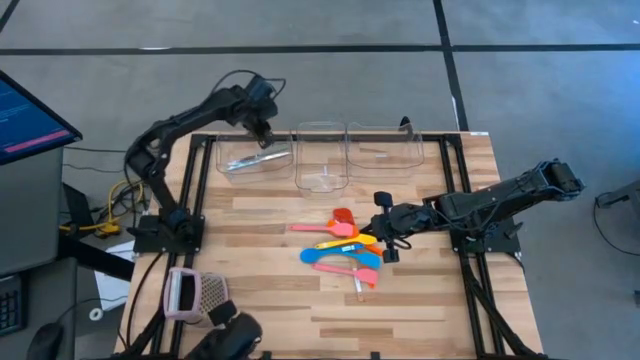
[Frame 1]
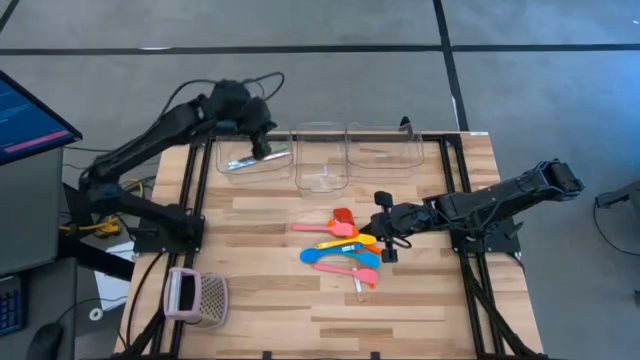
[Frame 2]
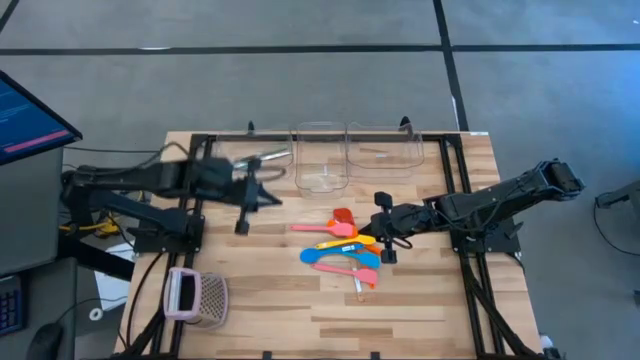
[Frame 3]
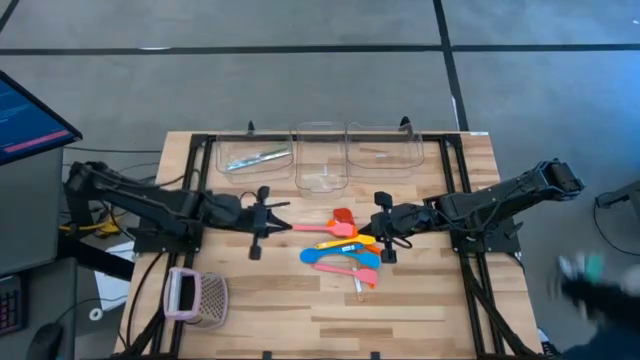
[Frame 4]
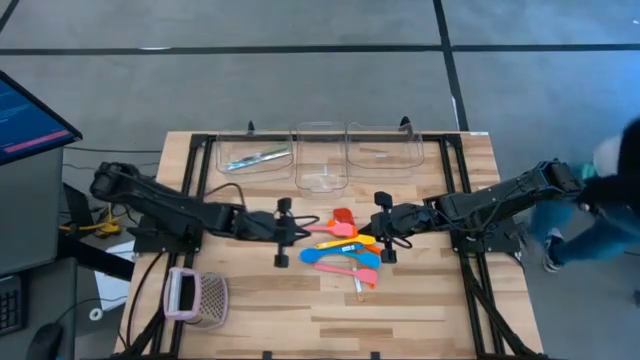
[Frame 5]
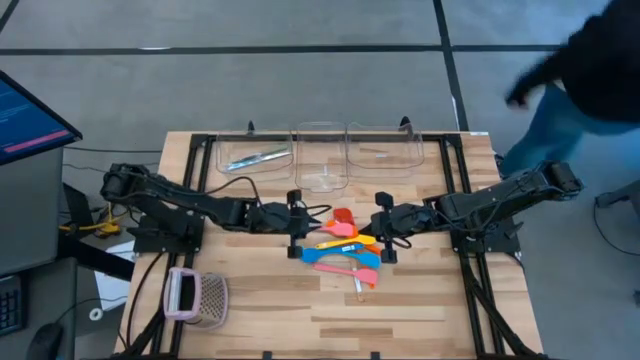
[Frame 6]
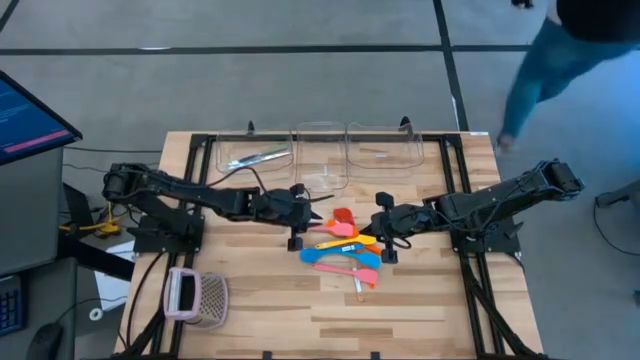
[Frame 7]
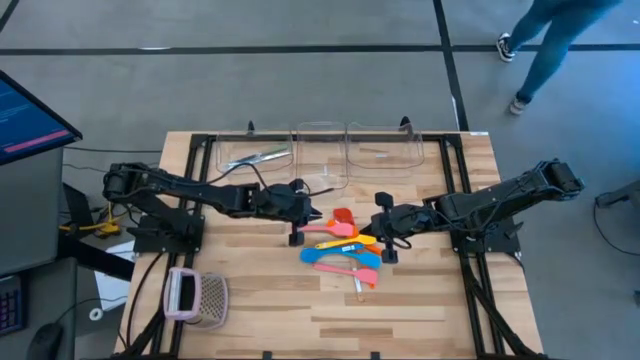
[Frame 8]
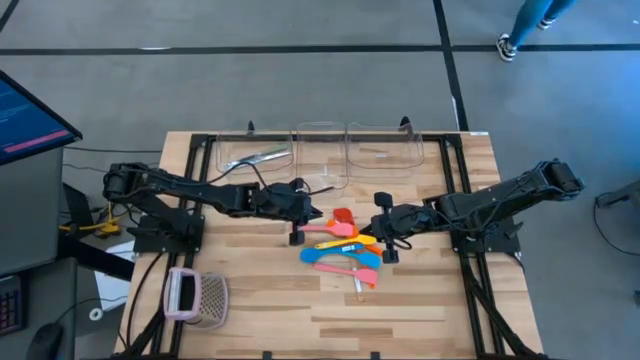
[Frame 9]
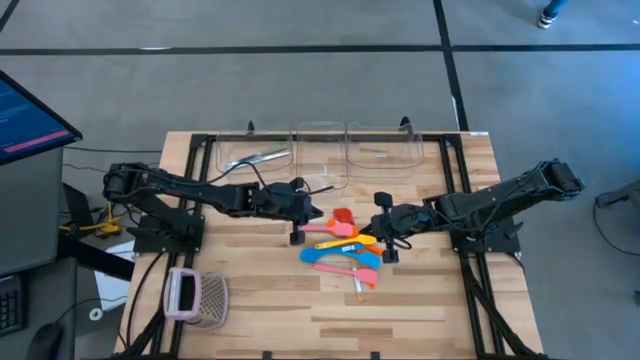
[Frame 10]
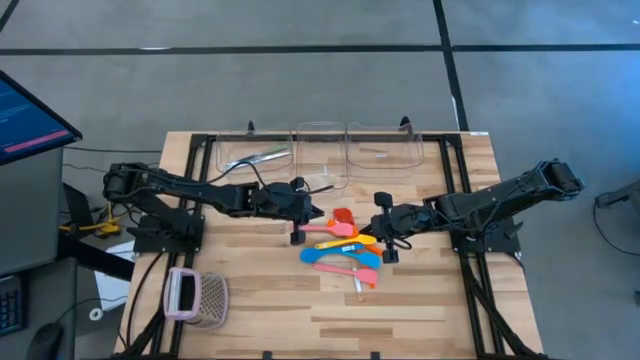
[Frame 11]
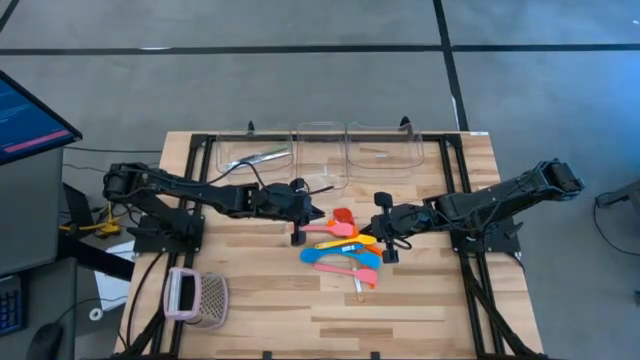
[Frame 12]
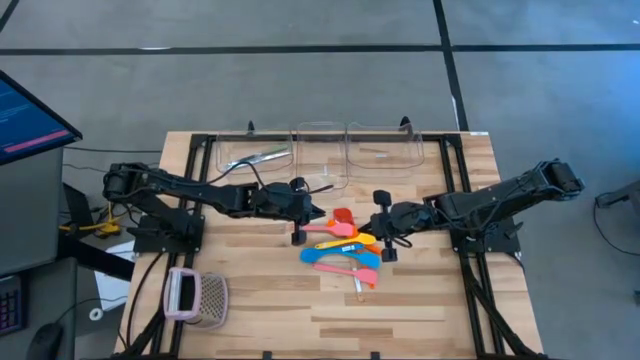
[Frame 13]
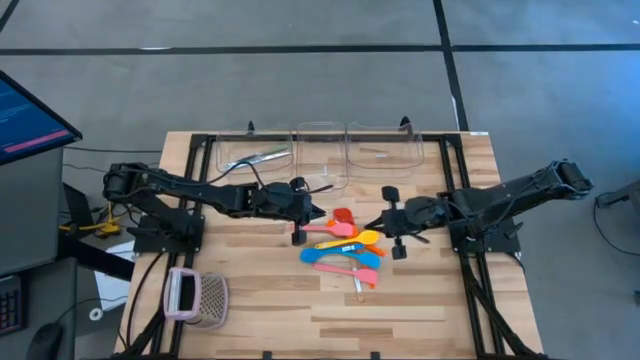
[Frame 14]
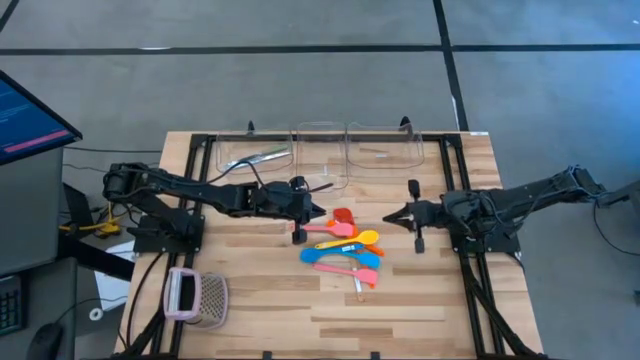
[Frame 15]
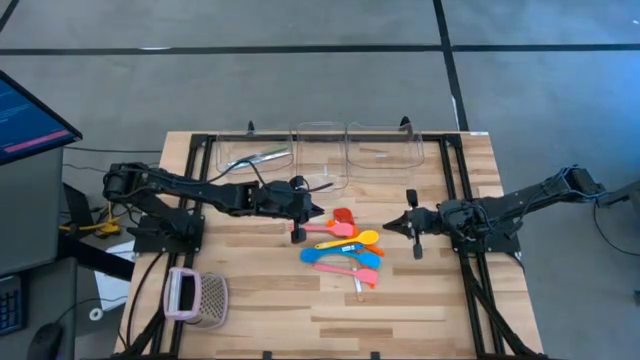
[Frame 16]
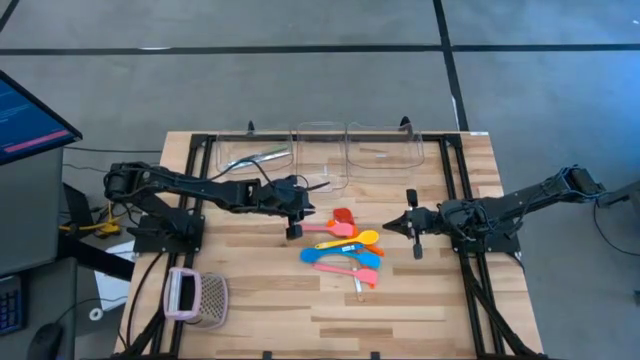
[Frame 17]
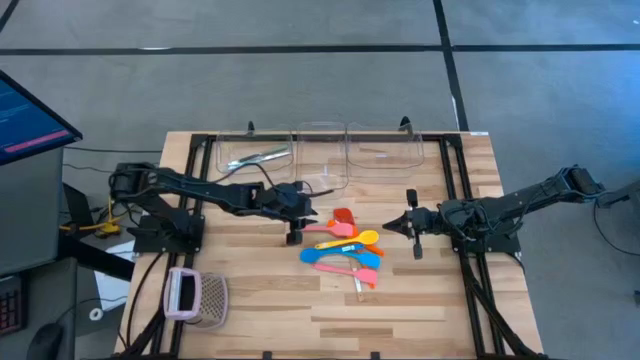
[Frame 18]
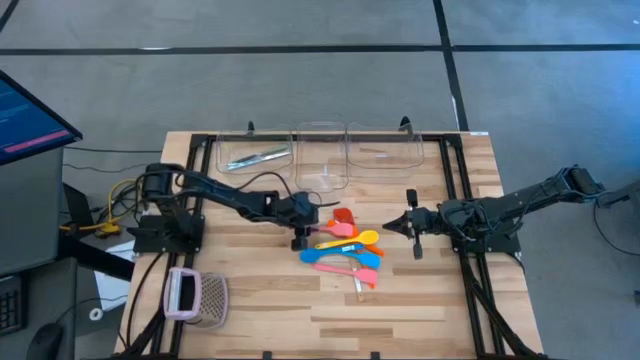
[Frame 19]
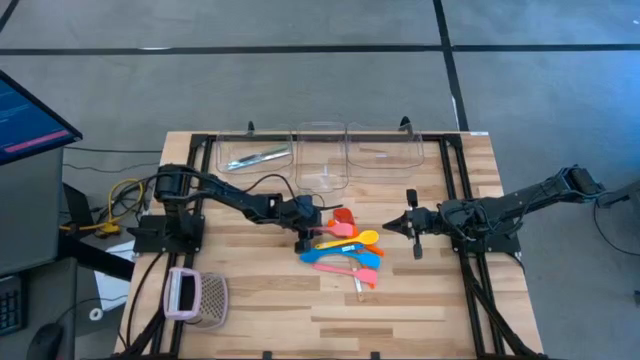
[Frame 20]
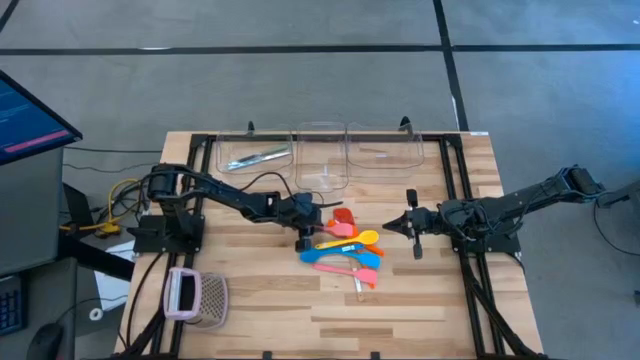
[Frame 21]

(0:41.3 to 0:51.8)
Task: Pick & Place Kitchen Items
Put the pink spatula into the middle transparent bin

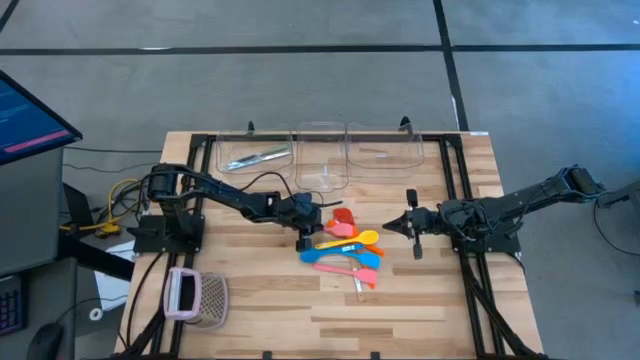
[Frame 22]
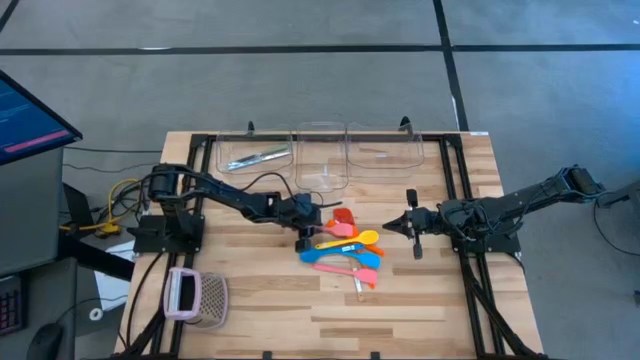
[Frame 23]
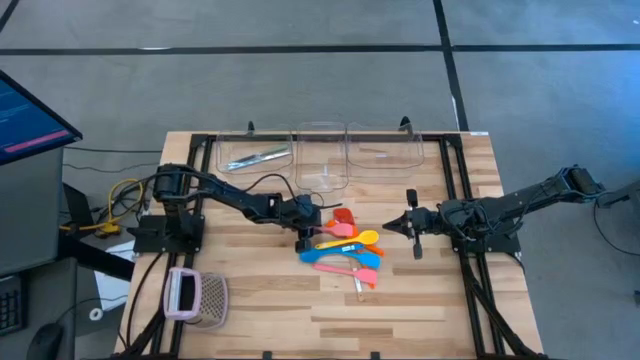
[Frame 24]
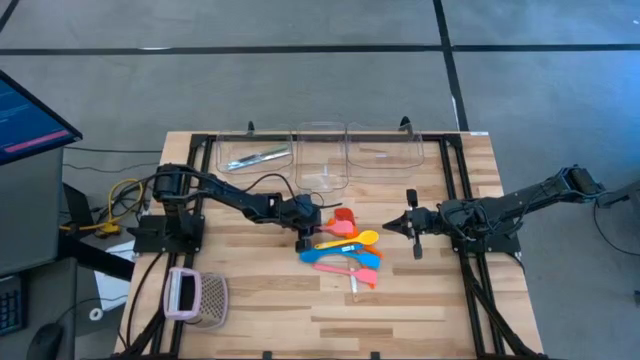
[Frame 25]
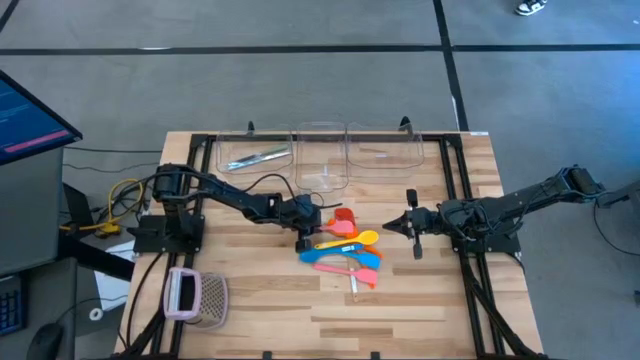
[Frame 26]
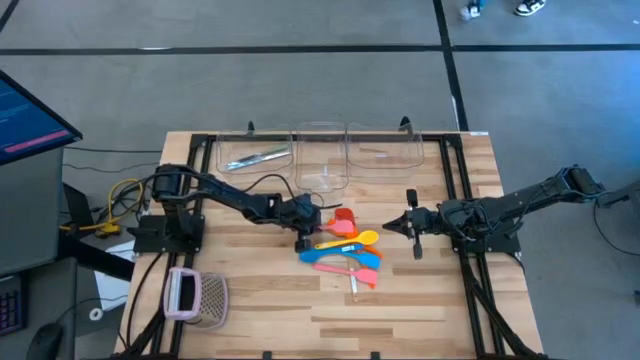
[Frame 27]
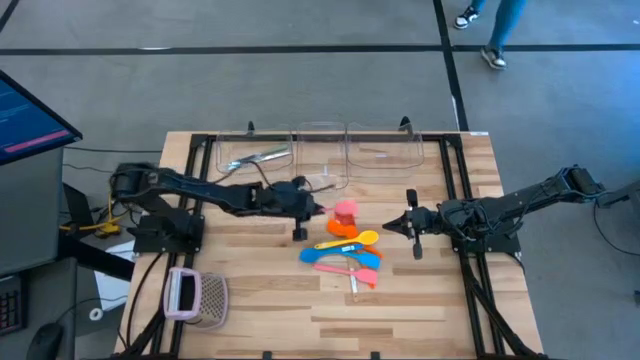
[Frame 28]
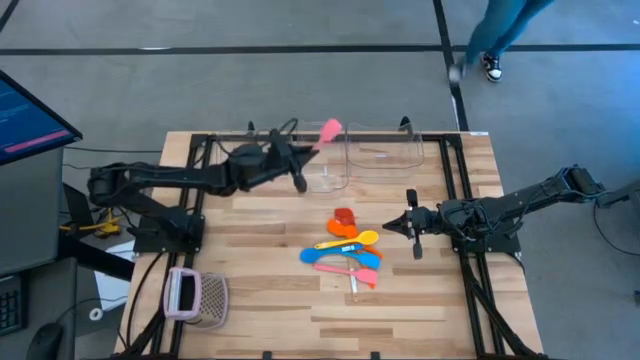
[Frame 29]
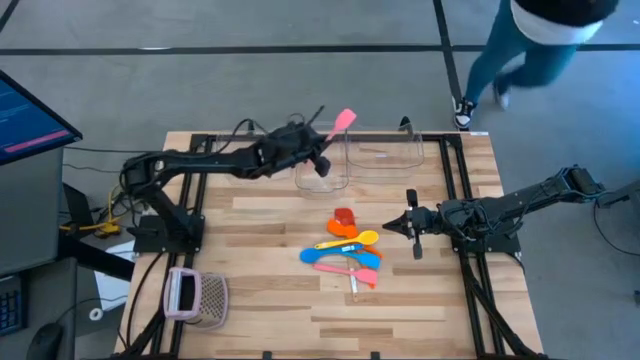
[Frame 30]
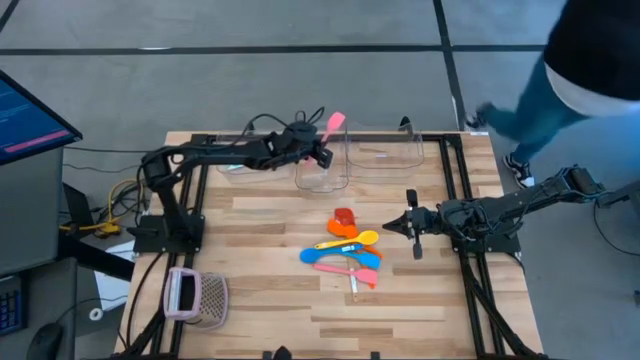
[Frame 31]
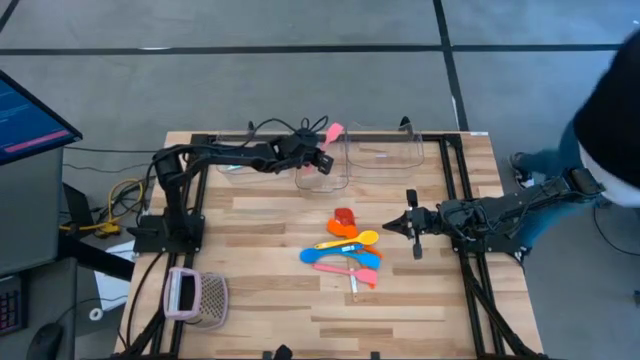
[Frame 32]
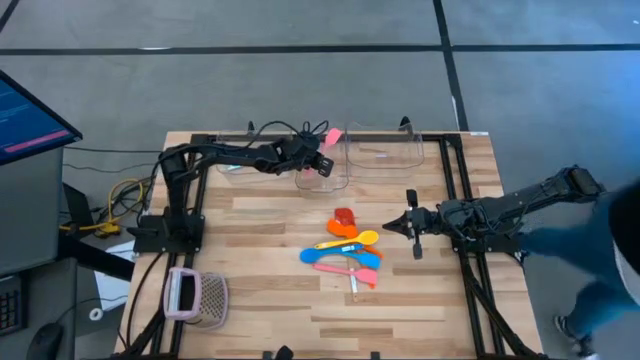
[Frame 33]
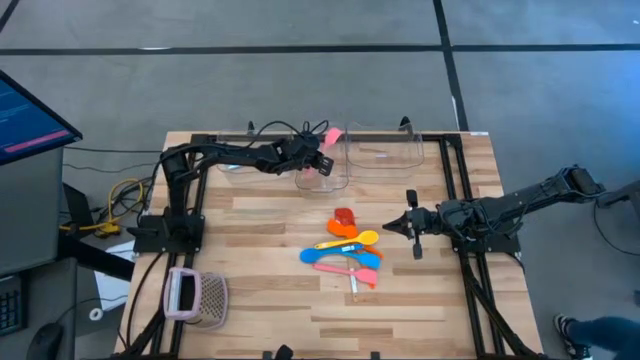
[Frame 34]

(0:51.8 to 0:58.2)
Put the pink spatula into the middle transparent bin

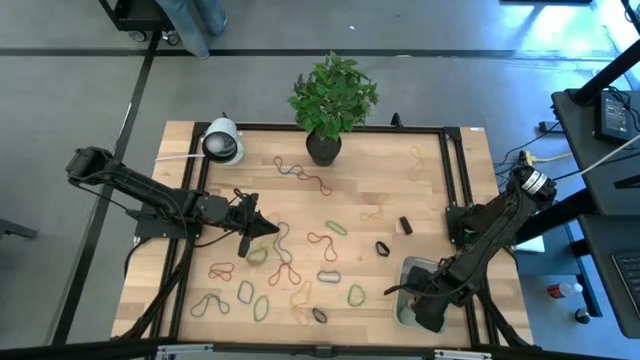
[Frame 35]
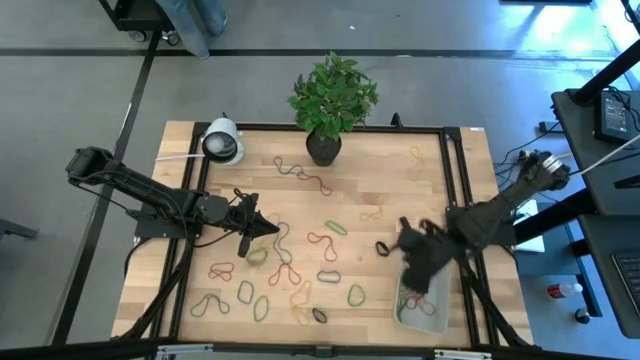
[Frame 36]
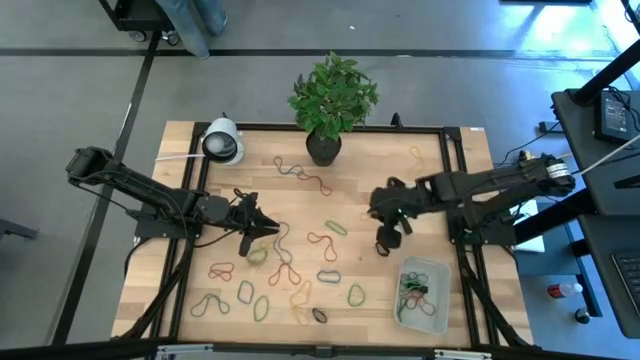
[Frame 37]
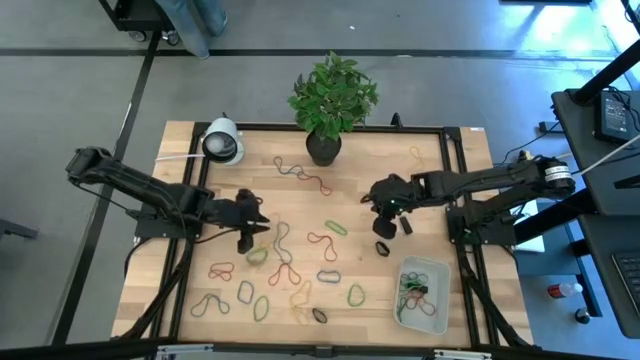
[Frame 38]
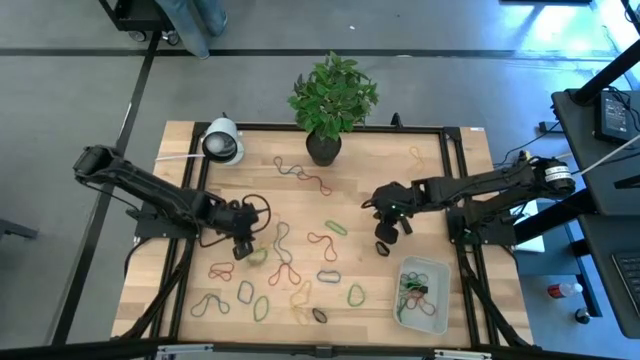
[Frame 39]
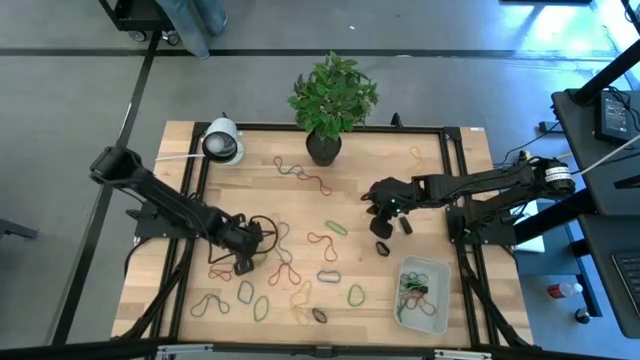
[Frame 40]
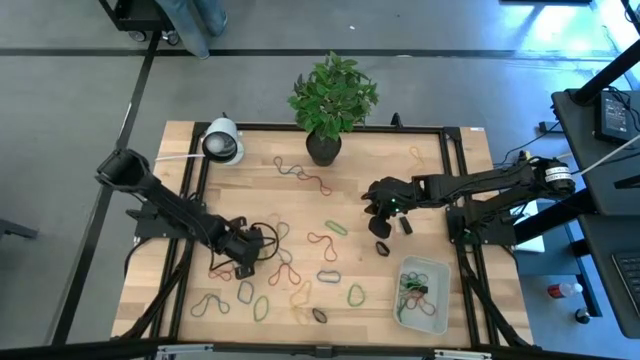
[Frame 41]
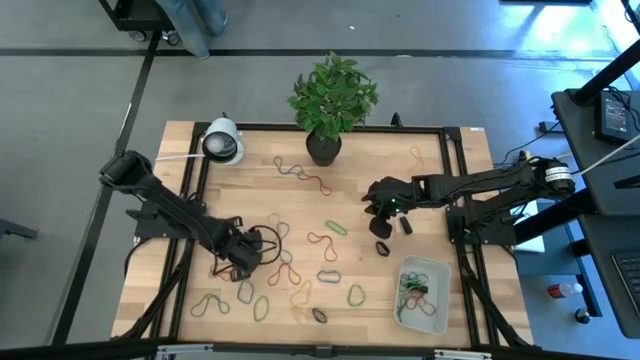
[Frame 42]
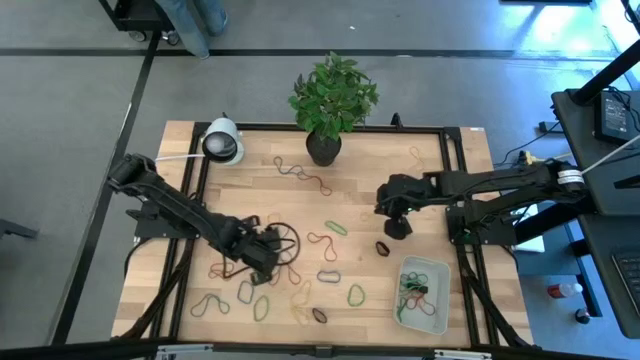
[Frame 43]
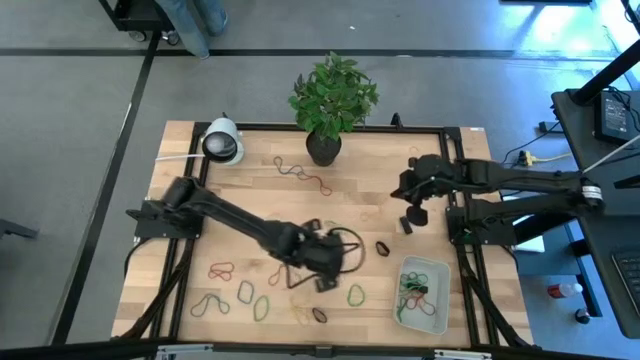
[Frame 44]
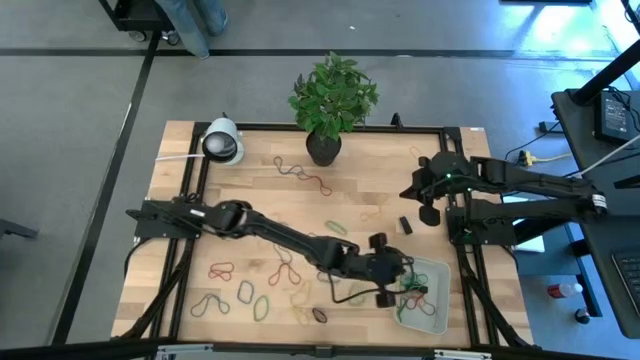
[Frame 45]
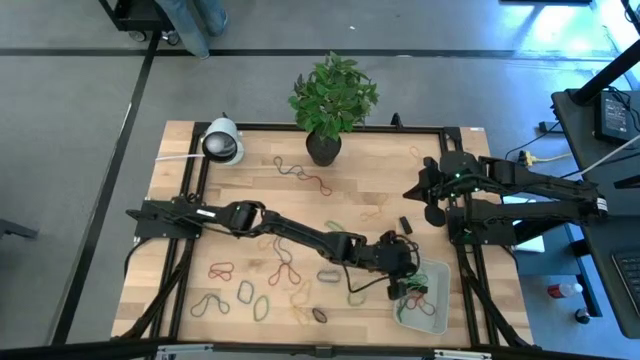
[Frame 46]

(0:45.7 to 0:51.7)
Task: Pick and place rubber bands into bin
Put the green rubber band into the gray bin
